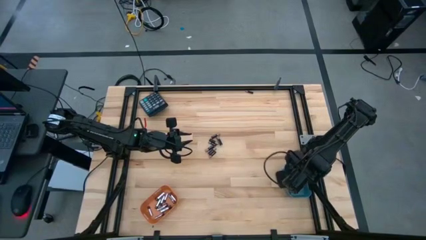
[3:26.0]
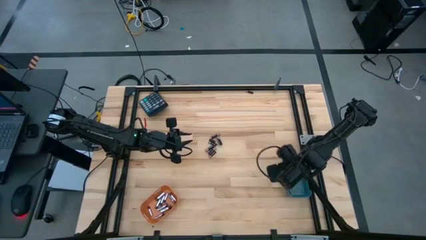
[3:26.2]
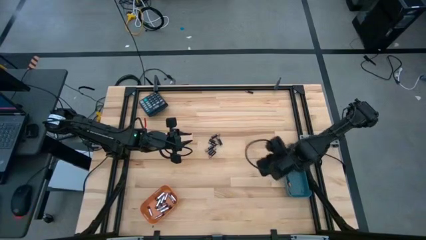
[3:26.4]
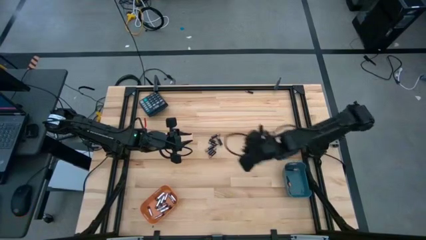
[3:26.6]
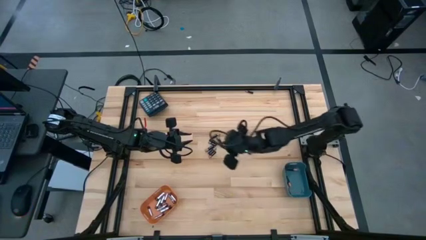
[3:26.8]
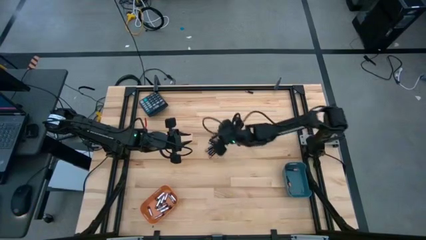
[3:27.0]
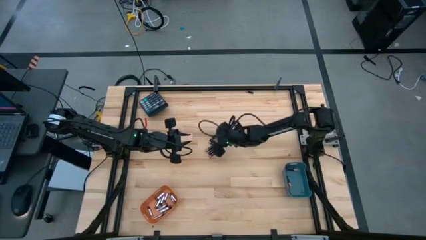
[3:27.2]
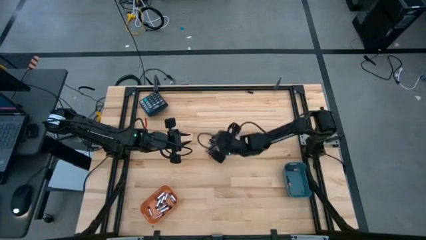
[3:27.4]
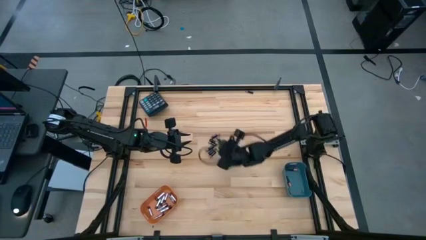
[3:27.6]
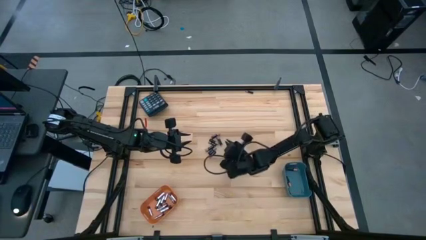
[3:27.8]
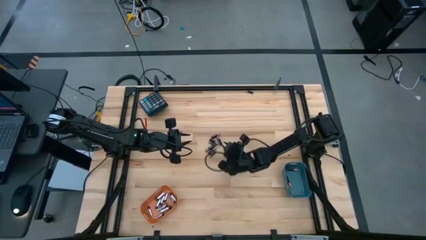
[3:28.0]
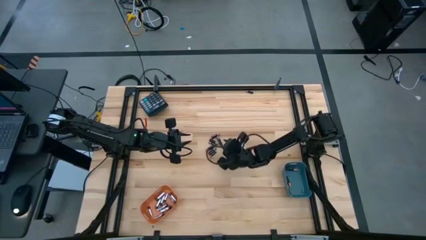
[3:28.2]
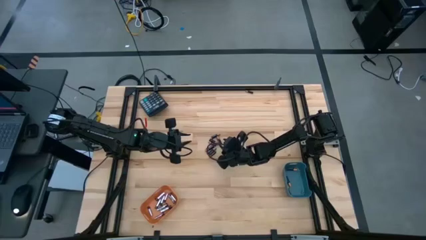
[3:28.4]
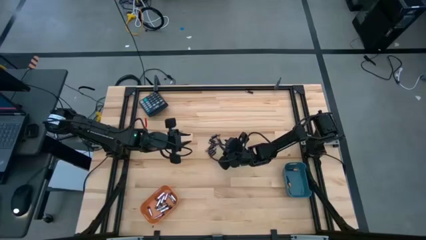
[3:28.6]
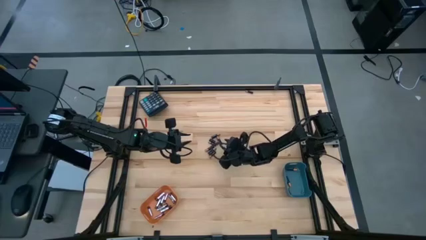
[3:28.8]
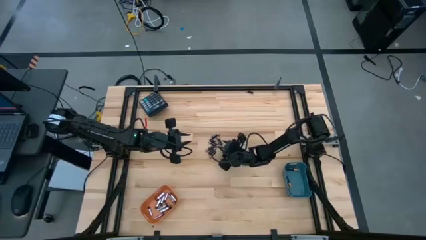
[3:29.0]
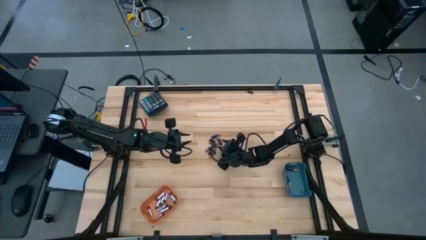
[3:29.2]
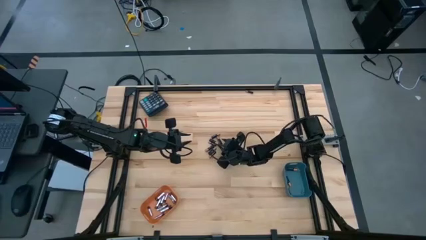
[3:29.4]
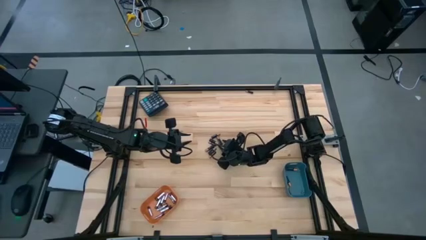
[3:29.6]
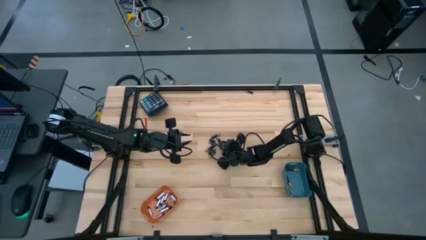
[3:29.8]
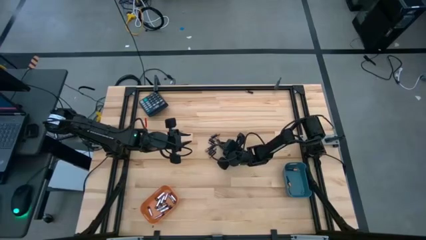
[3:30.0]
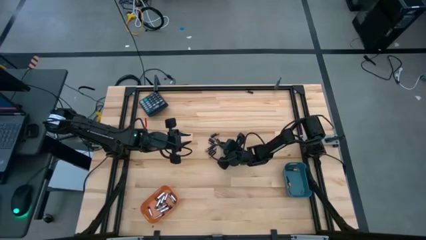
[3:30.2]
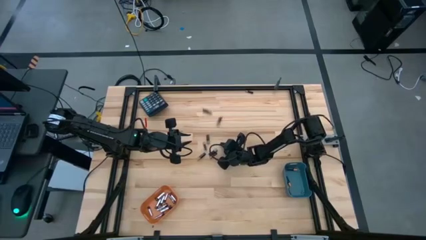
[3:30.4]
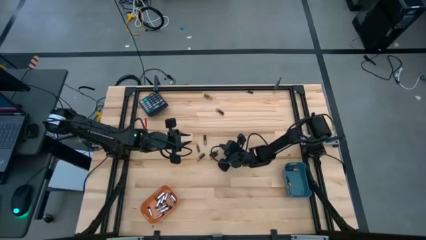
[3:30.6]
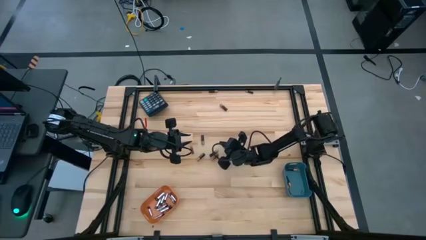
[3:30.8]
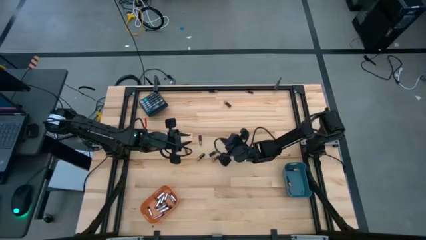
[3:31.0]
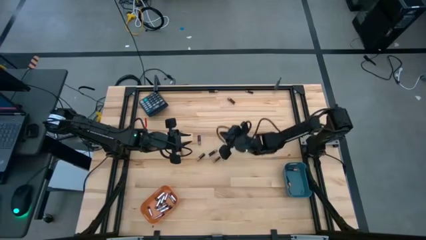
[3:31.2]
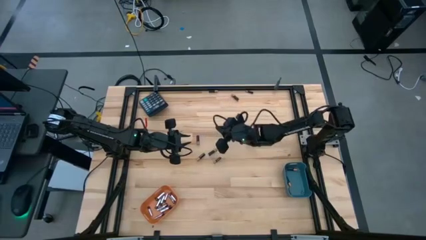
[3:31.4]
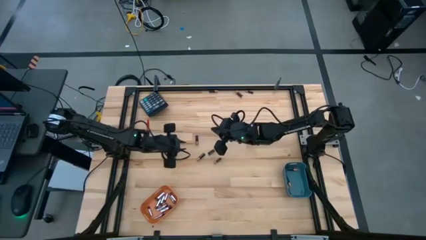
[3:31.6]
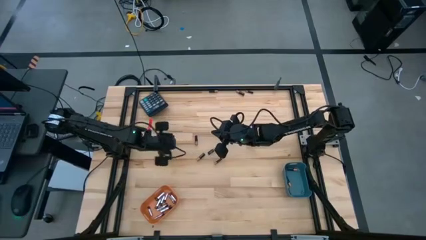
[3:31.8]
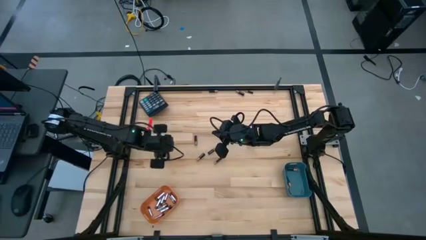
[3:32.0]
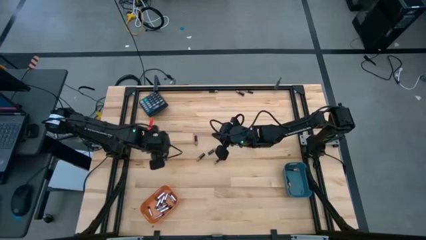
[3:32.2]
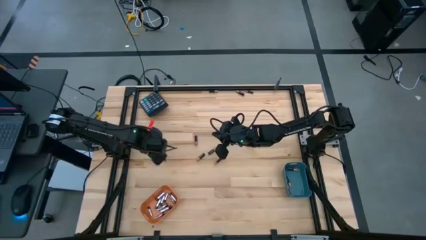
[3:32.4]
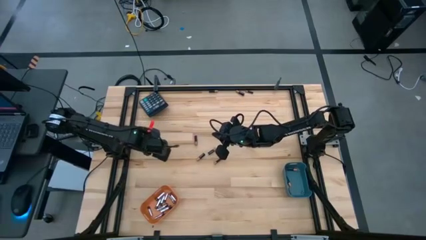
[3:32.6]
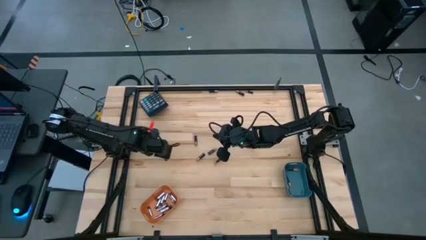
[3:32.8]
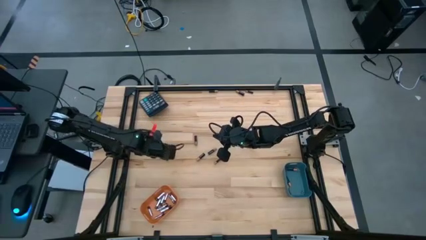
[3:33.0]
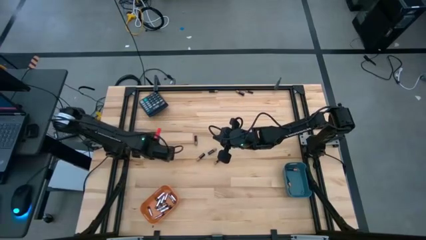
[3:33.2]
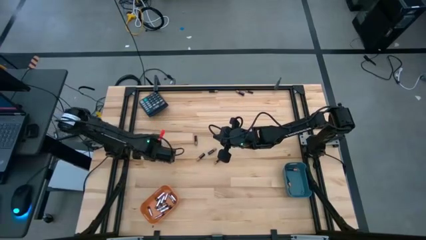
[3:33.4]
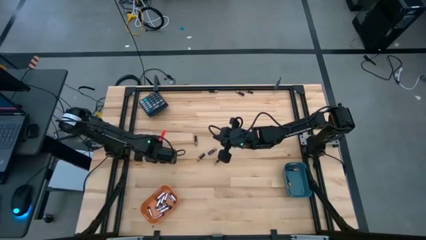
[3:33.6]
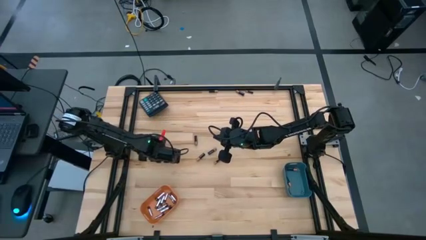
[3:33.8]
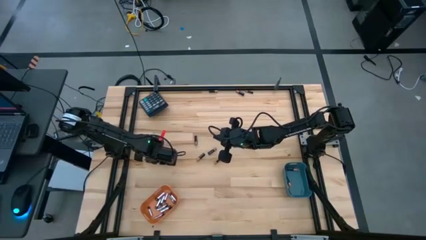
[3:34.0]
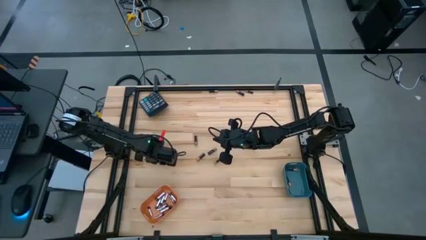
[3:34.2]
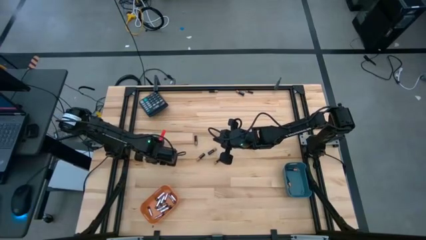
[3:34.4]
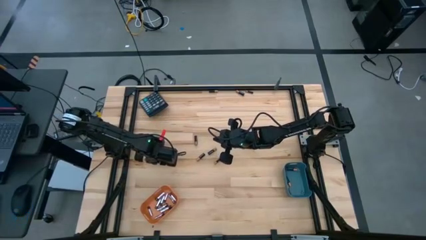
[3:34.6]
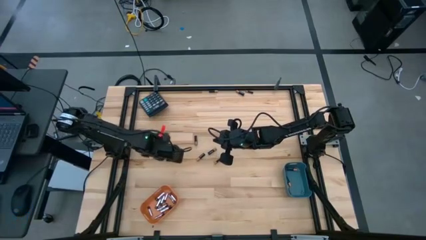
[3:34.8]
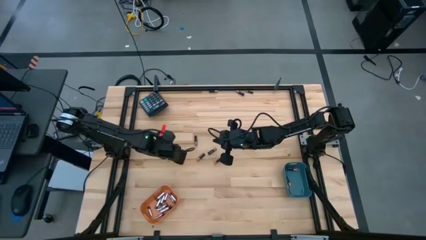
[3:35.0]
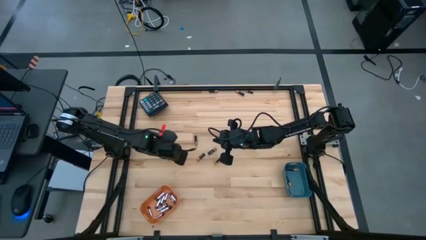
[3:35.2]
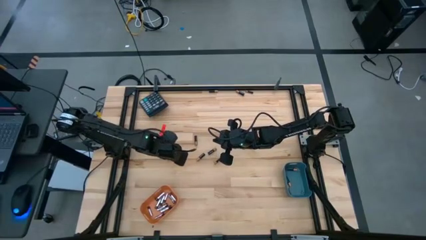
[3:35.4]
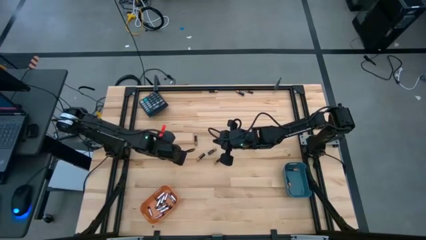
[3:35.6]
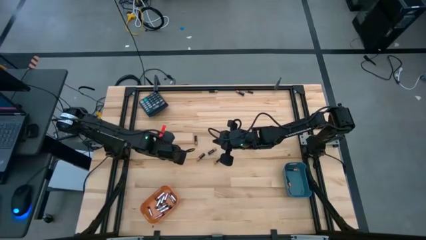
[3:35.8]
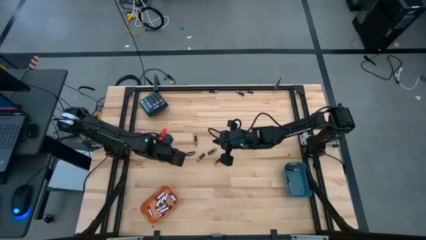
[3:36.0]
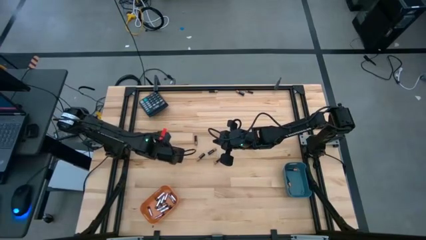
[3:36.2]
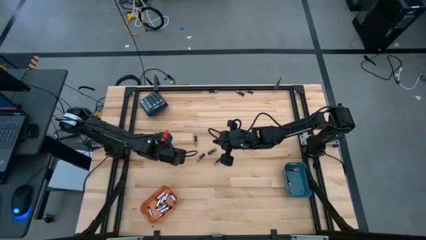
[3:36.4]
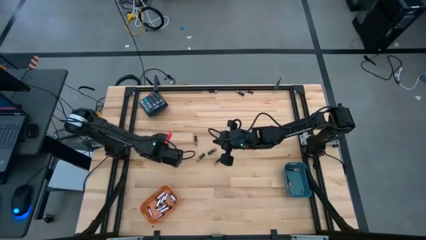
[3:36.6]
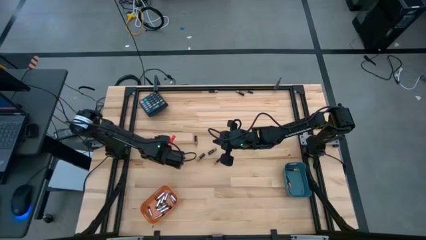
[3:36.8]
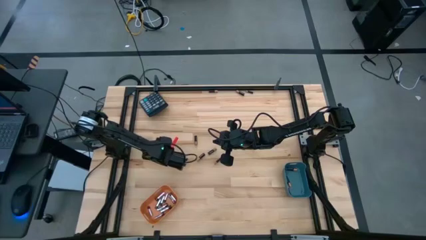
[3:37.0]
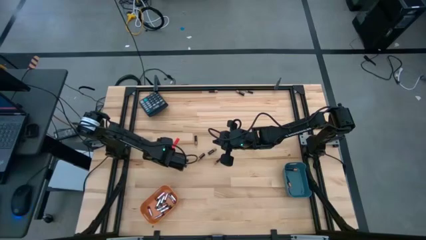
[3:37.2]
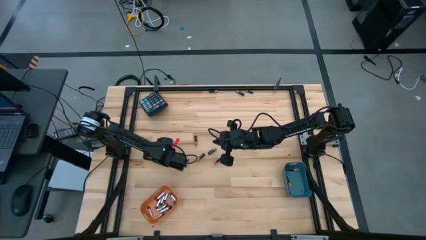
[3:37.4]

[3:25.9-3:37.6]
Task: Sort batteries
Put the black battery into the blue bin

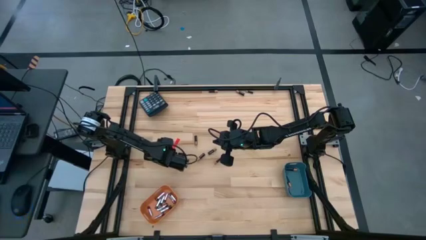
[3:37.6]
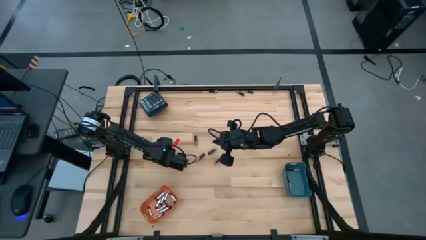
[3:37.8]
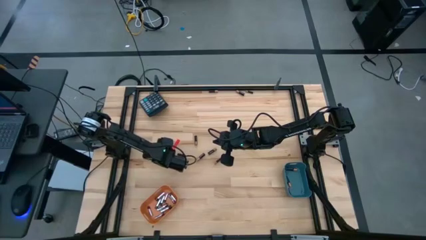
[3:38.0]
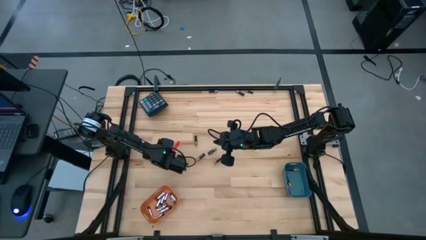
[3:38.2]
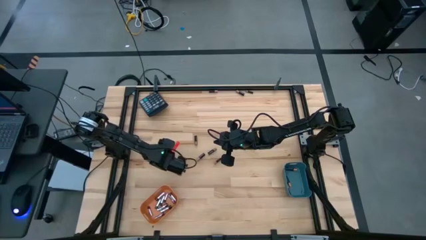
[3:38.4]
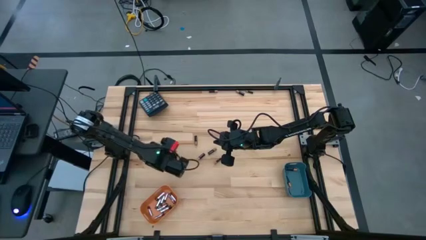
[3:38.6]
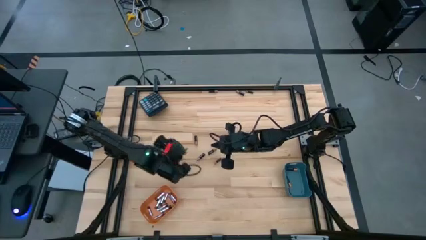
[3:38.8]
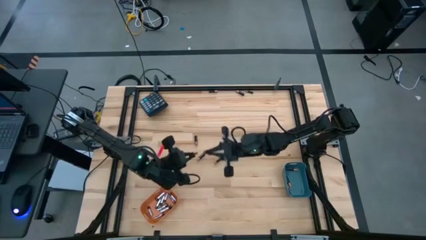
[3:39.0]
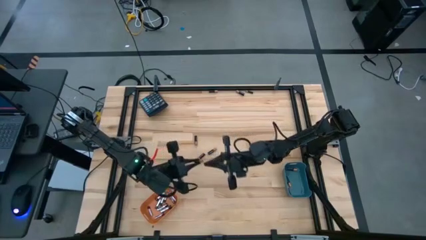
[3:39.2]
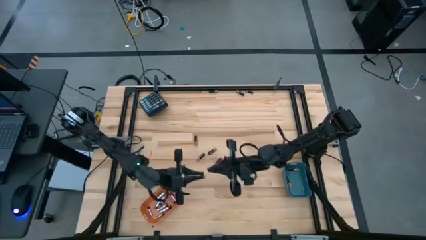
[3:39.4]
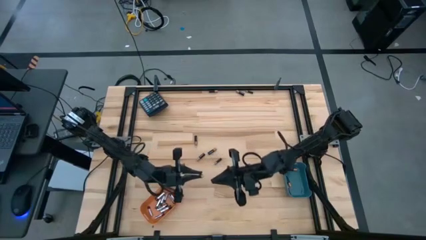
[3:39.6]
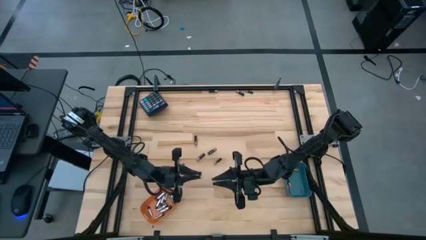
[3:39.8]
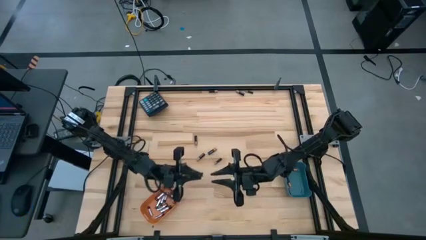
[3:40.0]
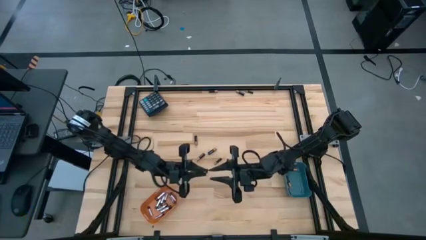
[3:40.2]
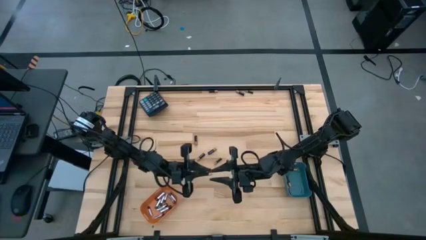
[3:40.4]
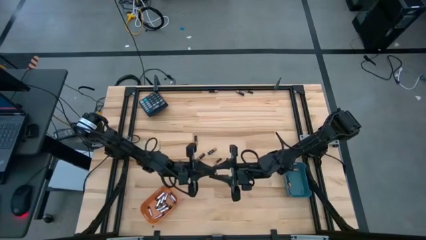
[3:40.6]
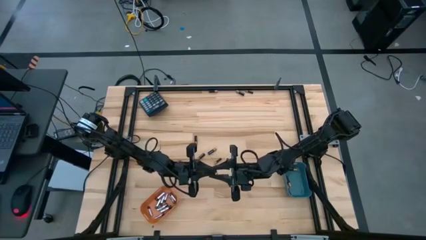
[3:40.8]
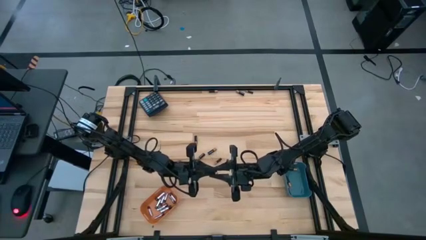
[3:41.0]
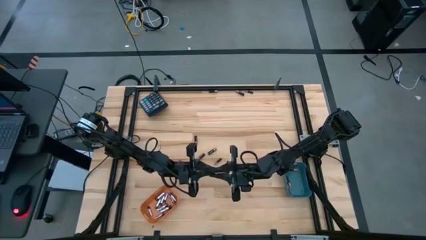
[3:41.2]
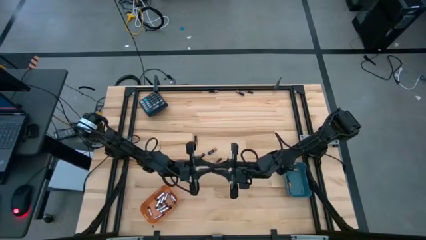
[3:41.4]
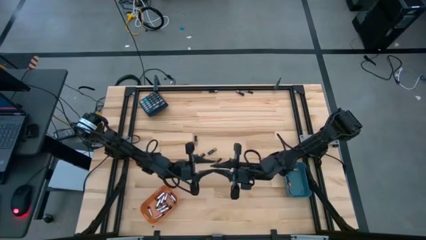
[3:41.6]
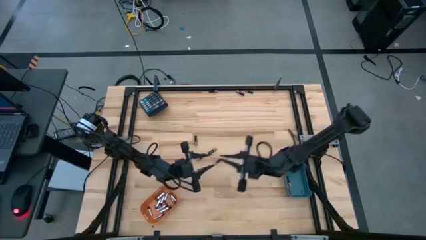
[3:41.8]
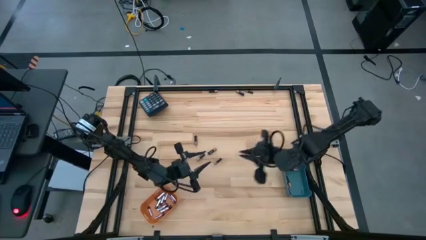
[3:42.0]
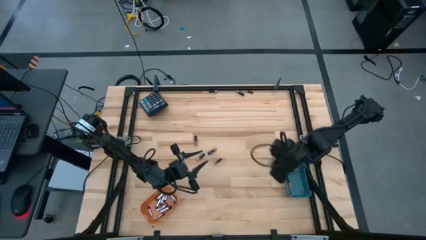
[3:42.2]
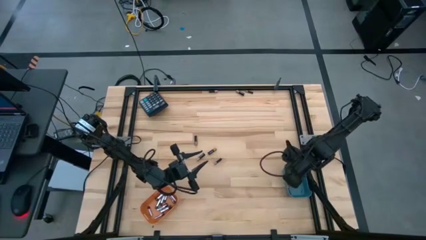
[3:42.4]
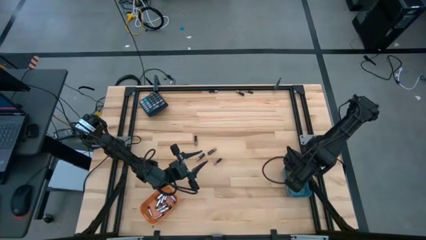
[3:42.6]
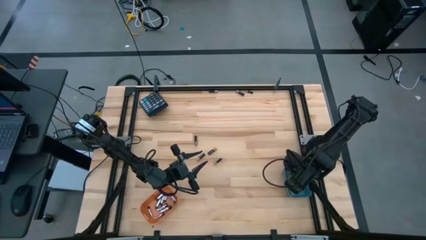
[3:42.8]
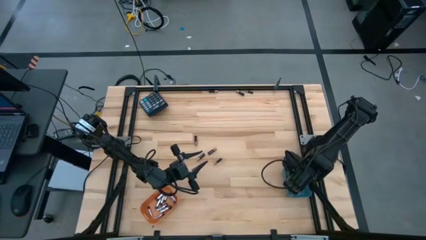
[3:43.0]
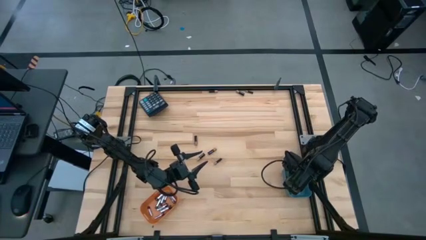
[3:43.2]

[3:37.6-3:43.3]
Put the black battery into the blue bin
